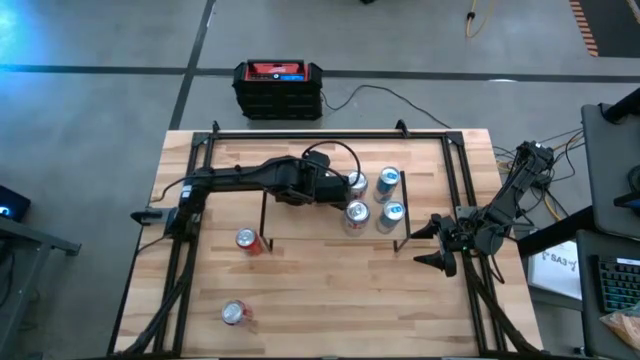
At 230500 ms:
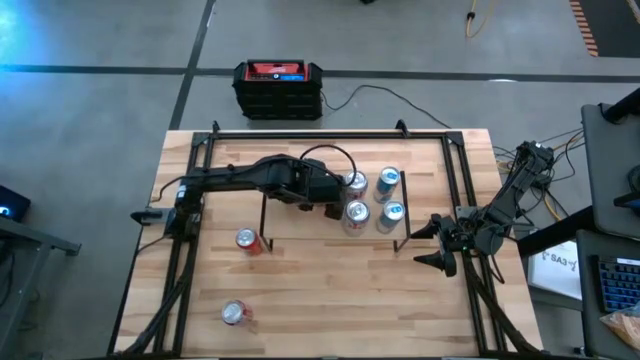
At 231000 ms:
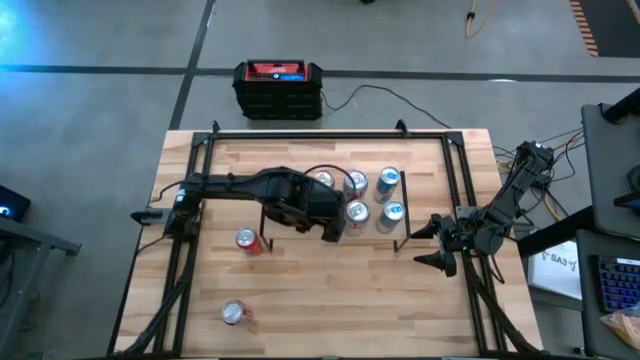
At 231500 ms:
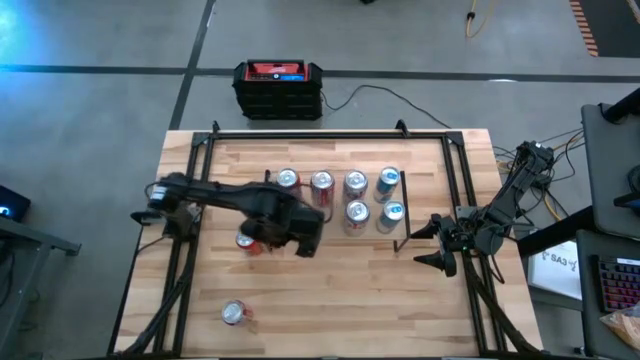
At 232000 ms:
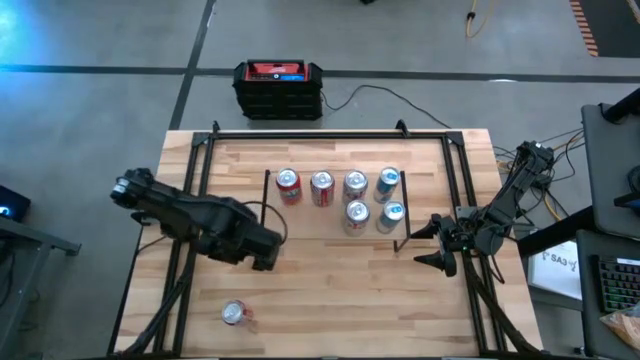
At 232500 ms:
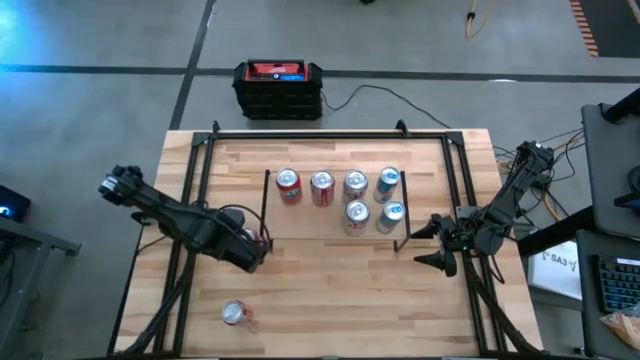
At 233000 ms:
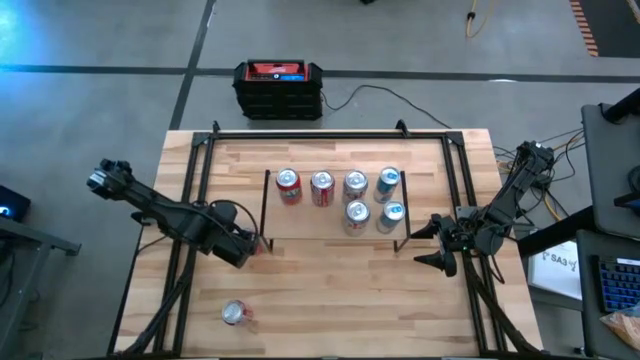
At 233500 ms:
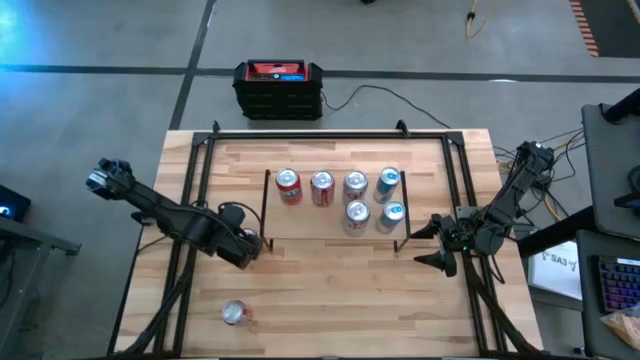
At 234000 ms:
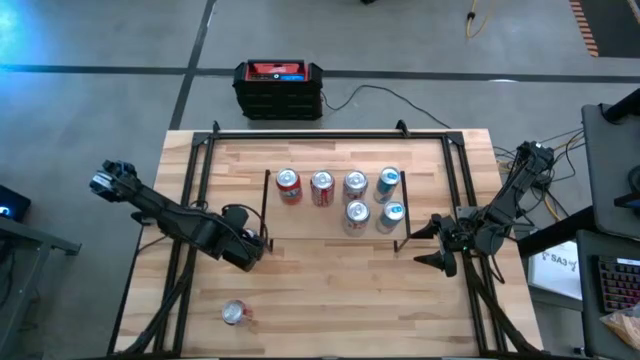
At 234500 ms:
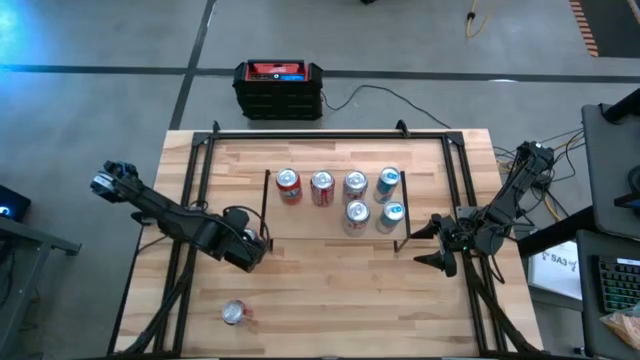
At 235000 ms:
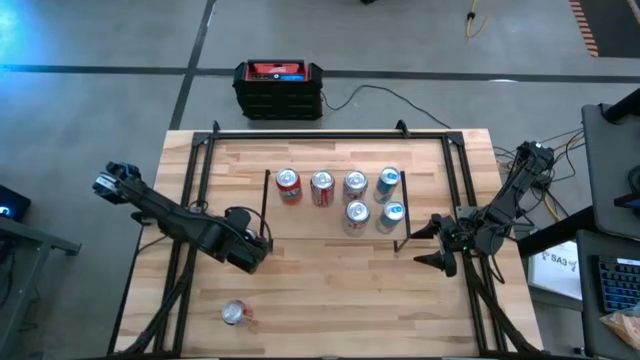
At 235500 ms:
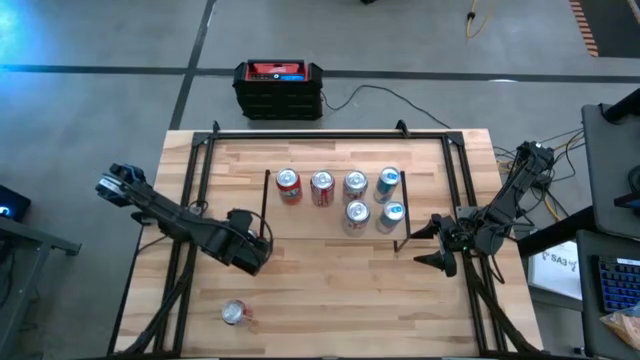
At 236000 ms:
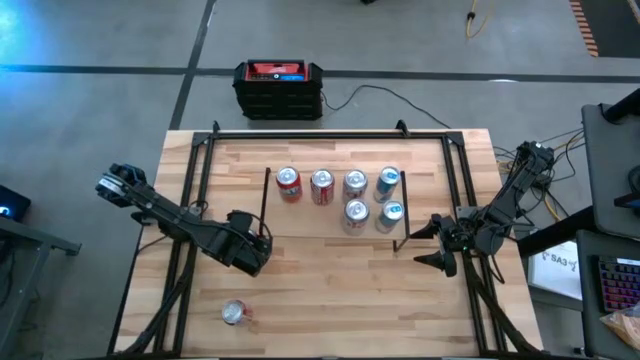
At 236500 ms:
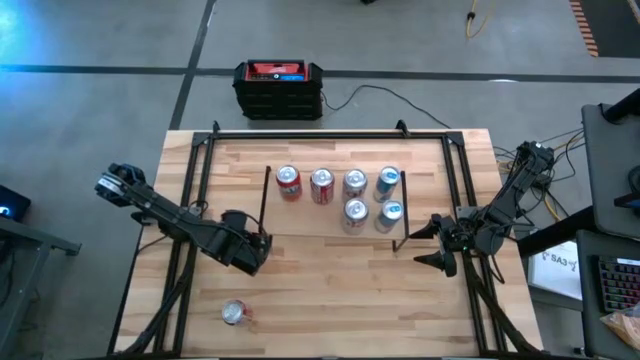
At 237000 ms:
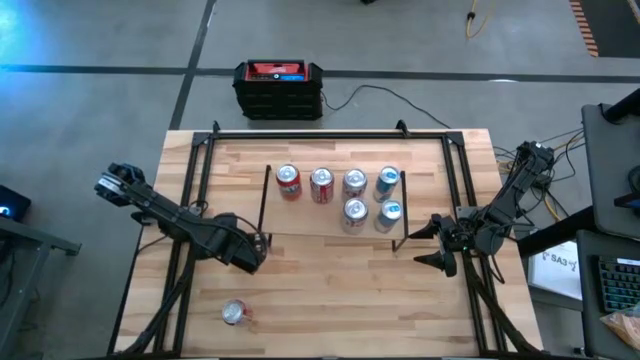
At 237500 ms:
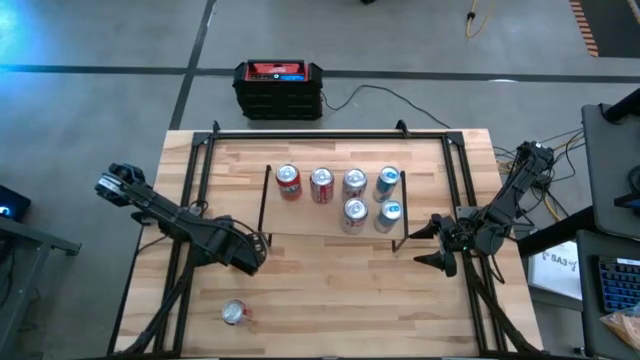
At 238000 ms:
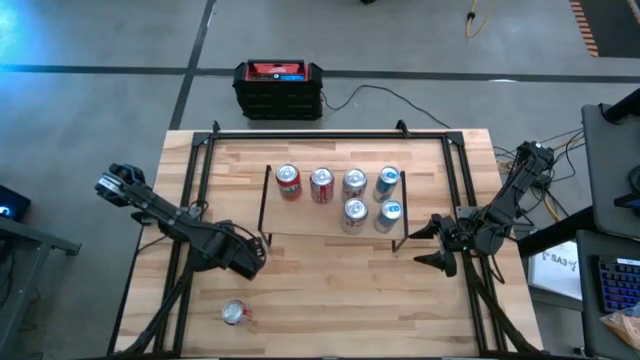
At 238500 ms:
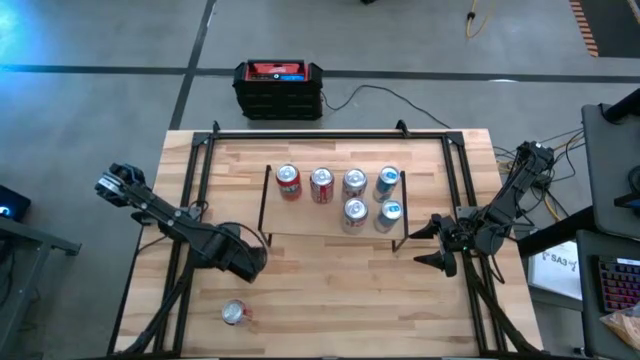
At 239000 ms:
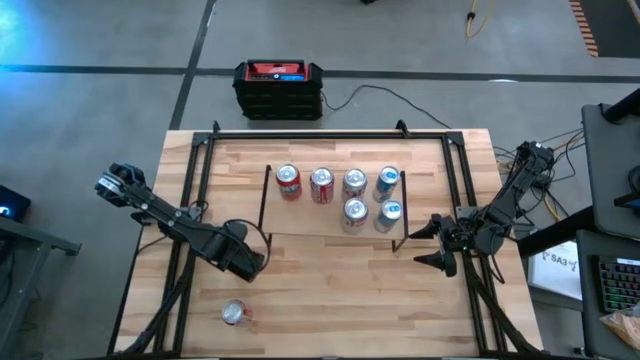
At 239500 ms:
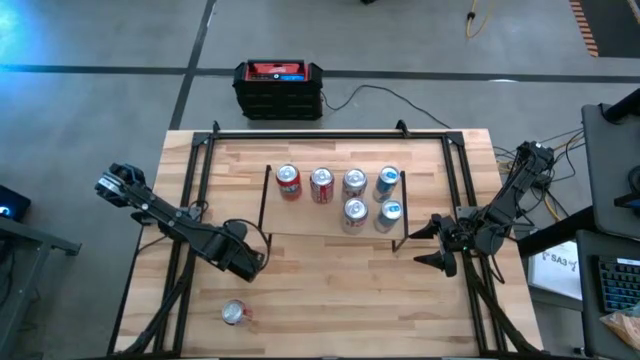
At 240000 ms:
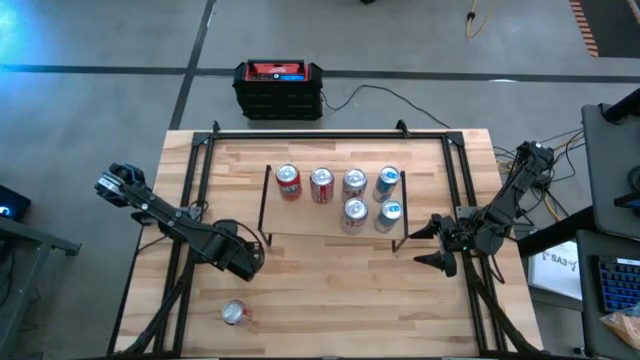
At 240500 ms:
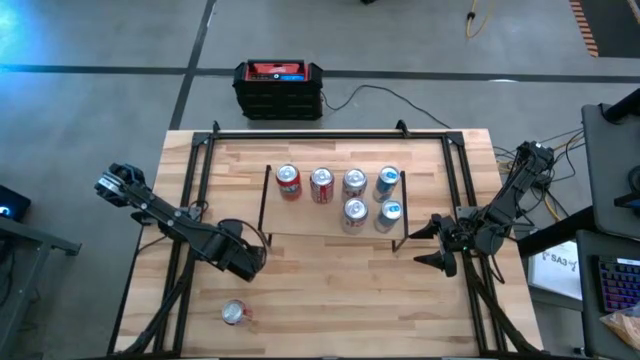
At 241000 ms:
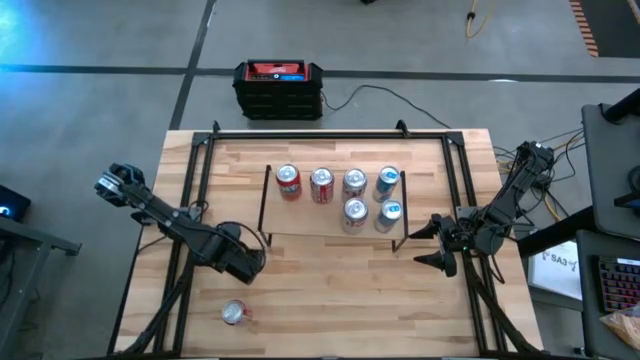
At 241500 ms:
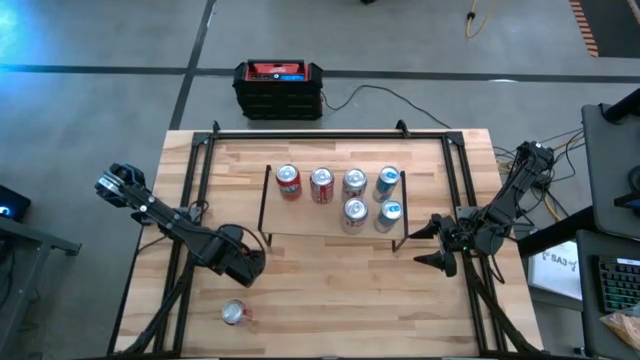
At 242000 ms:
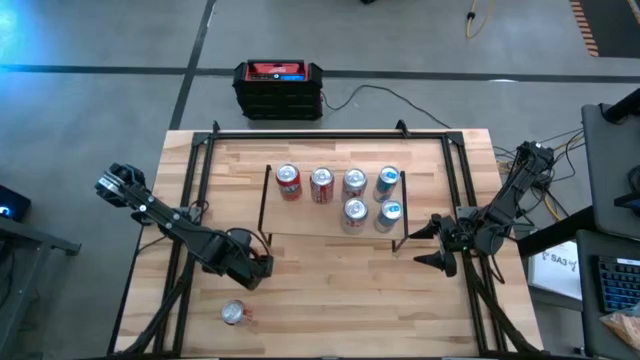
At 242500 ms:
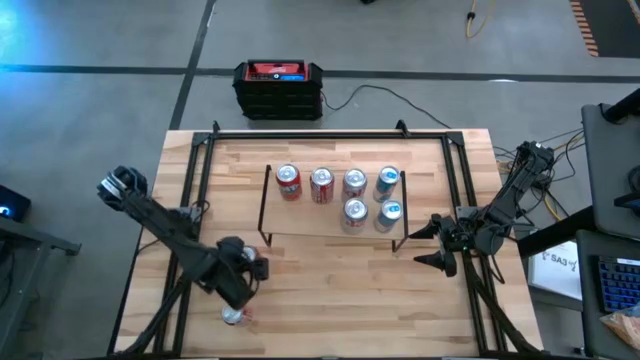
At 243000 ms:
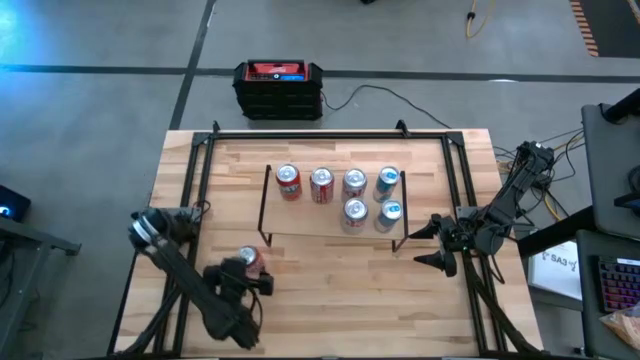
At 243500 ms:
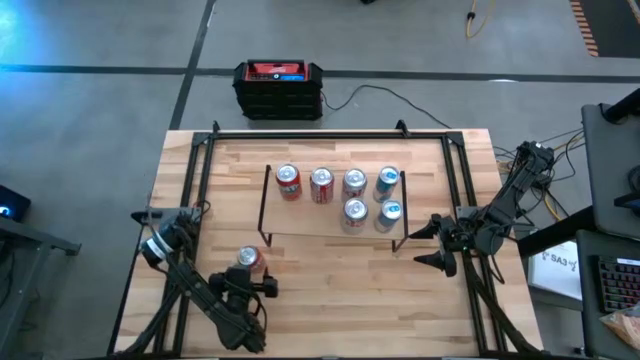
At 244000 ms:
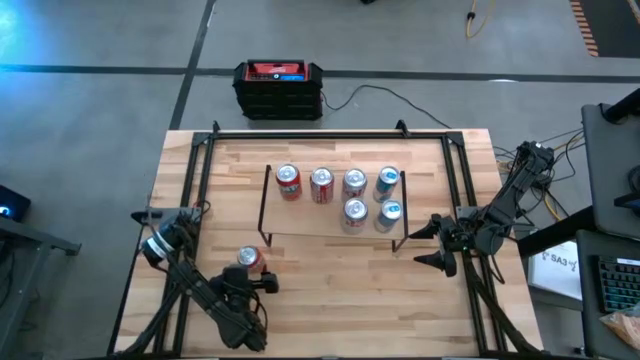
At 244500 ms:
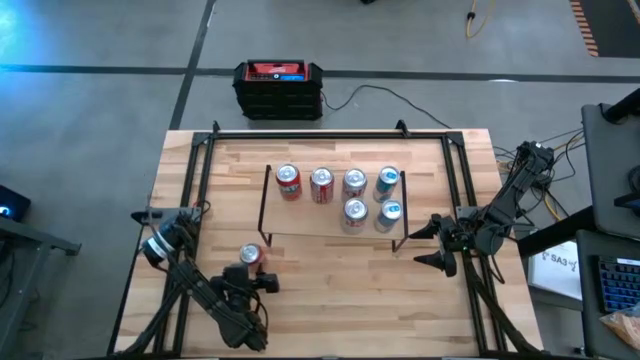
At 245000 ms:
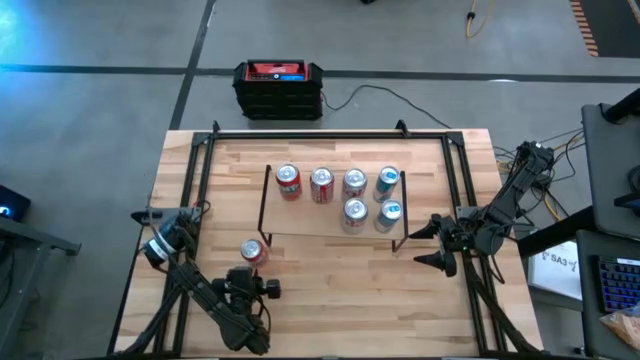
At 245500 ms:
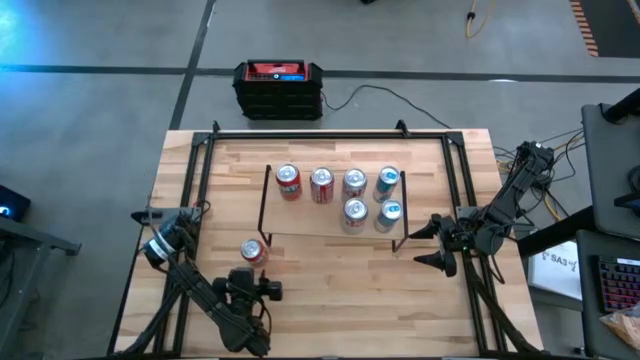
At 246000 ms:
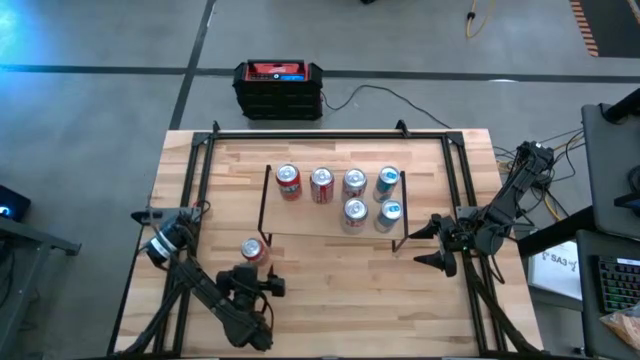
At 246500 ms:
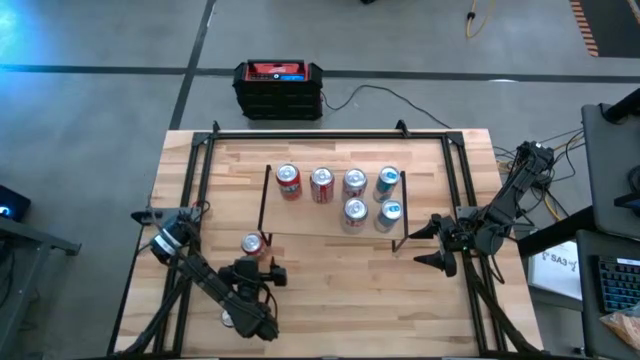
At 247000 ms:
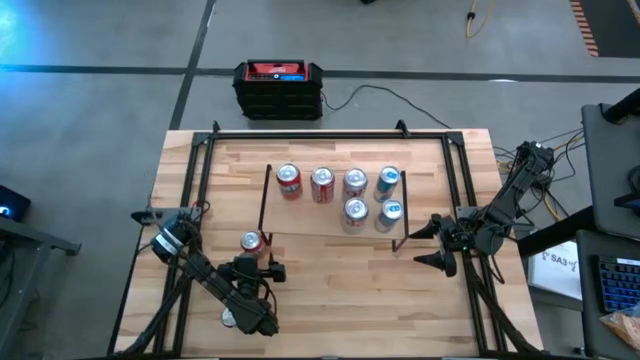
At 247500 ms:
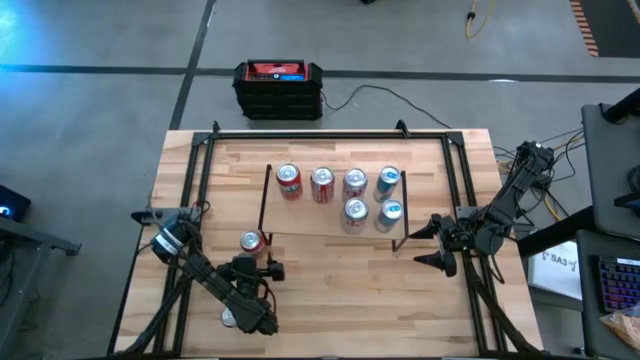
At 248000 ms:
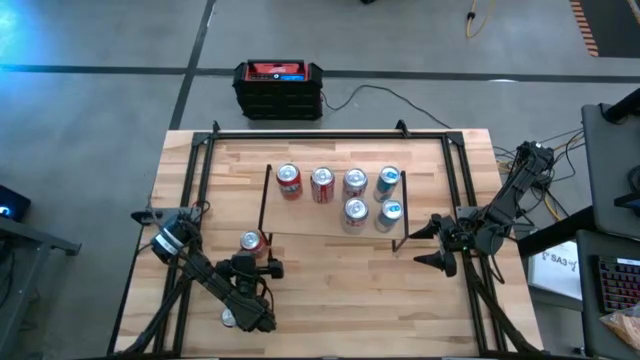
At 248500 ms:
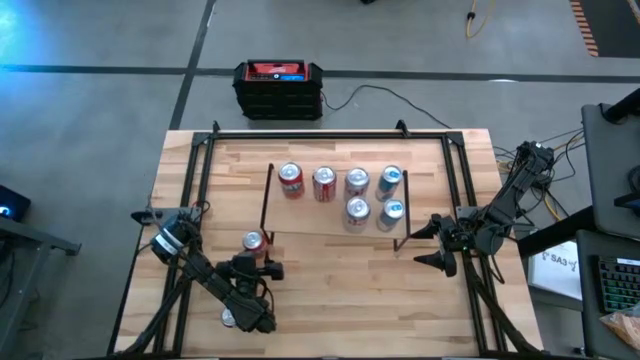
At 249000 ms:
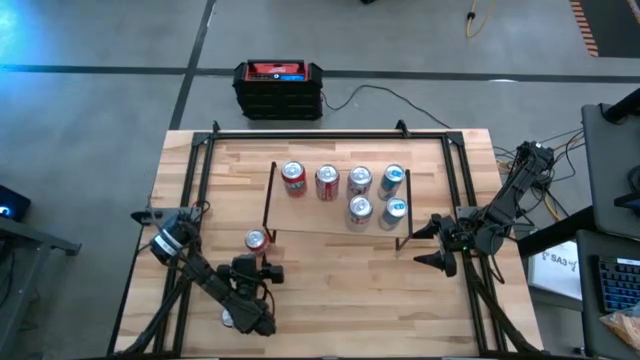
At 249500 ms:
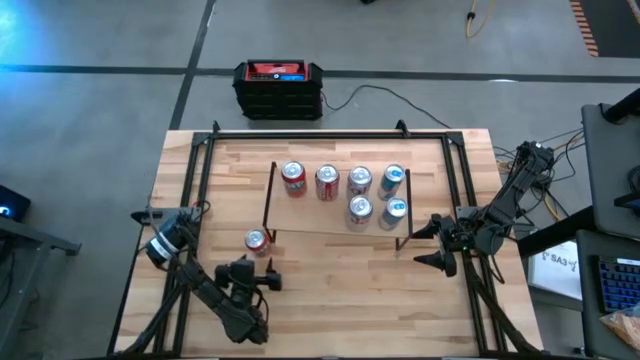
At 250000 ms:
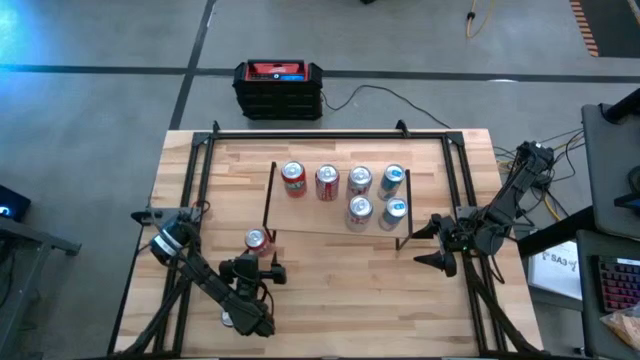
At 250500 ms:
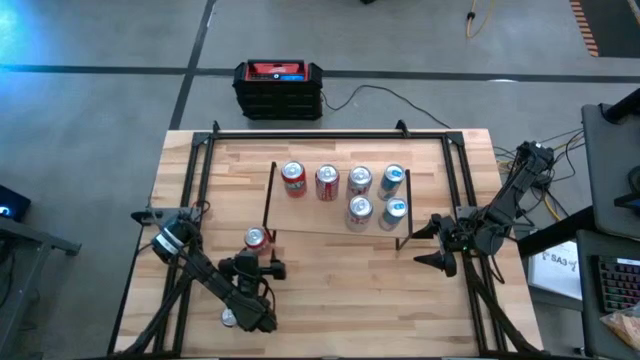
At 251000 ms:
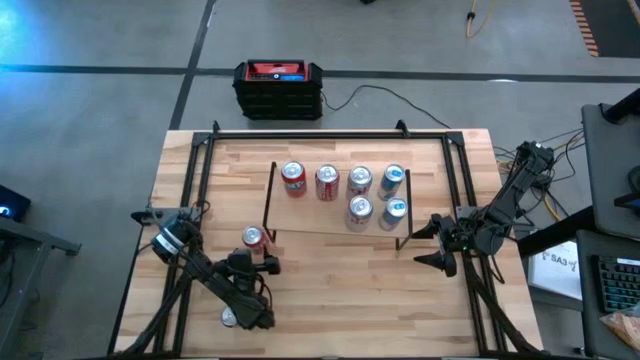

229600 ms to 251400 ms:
Task: Place canned beverage on shelf
Put the red soda can on the shelf aligned with the other red soda can
